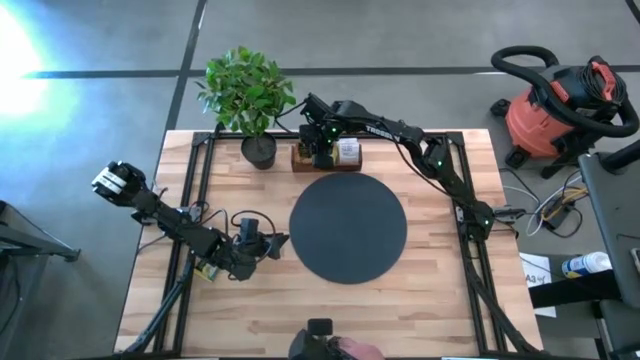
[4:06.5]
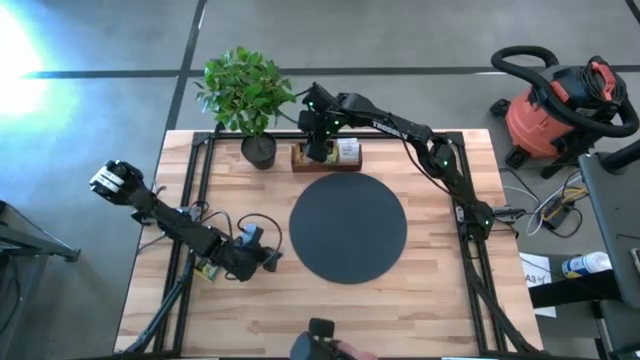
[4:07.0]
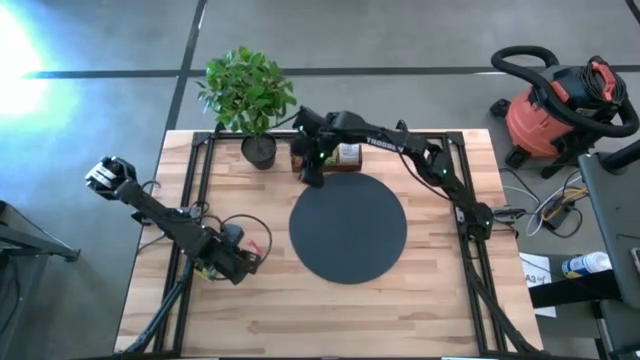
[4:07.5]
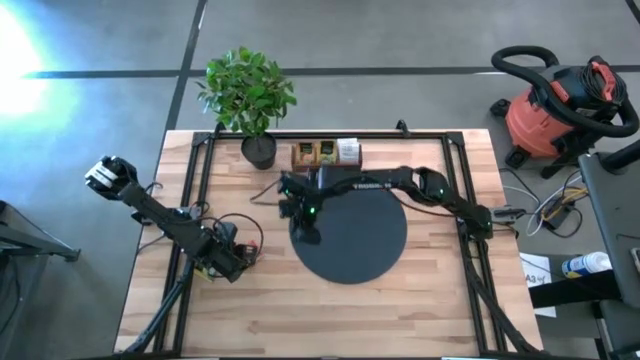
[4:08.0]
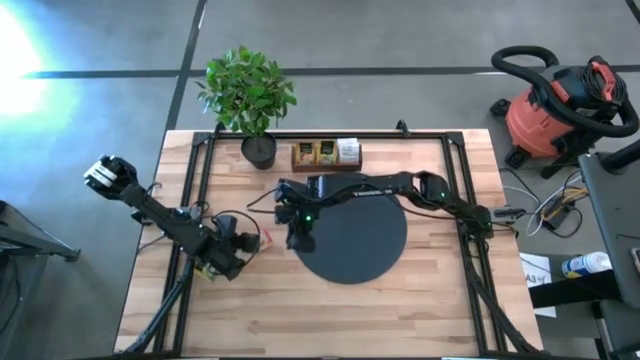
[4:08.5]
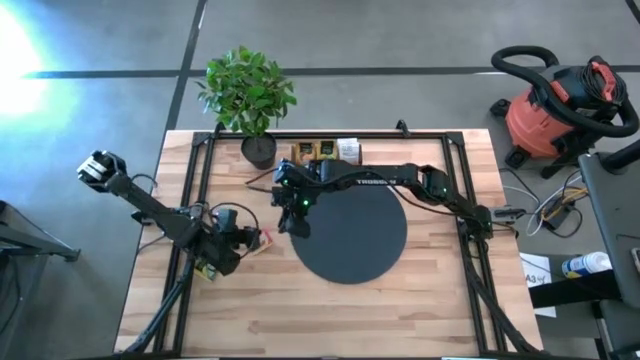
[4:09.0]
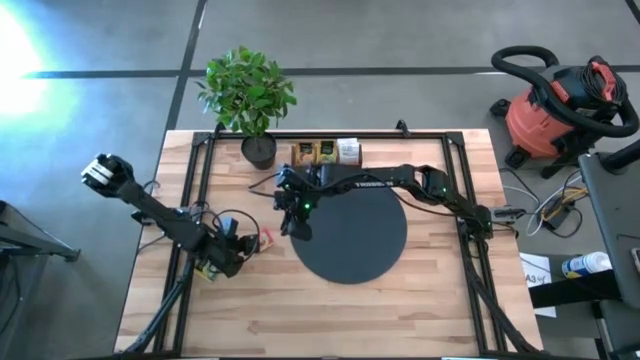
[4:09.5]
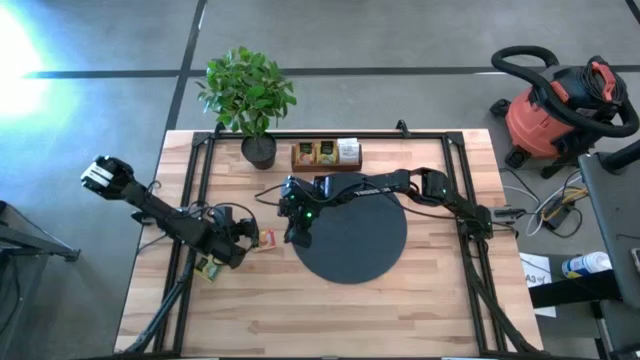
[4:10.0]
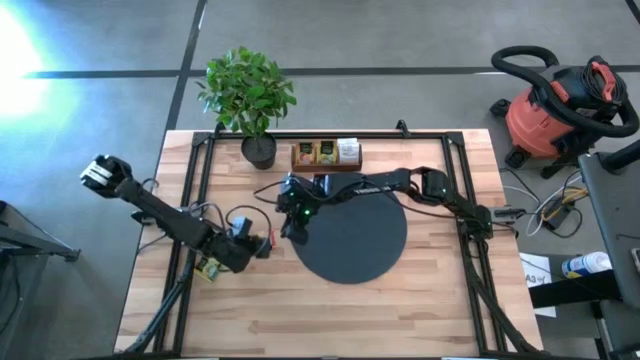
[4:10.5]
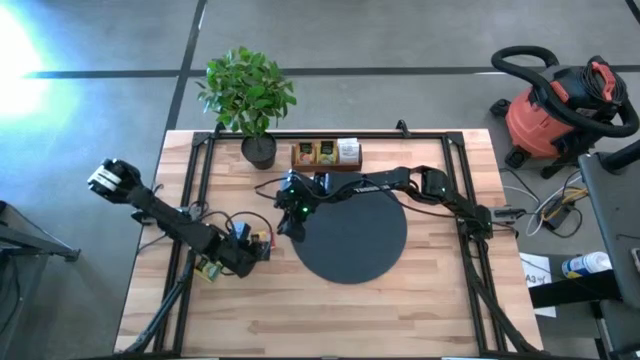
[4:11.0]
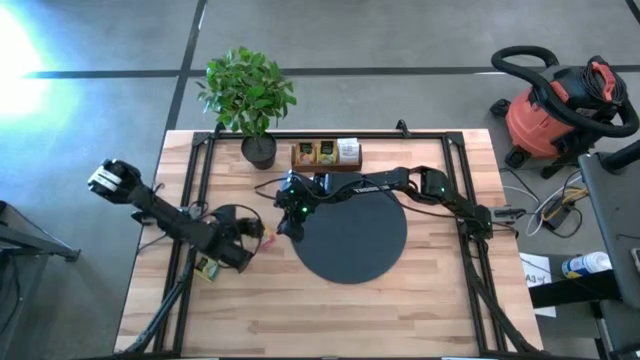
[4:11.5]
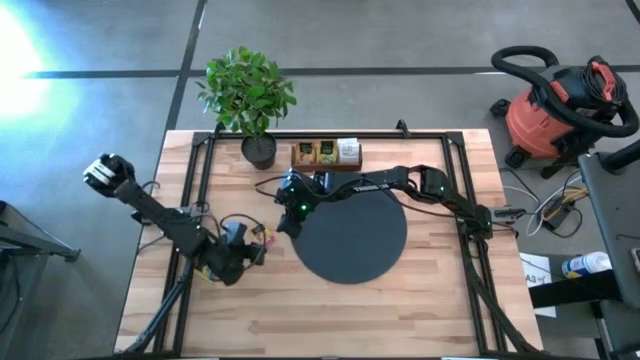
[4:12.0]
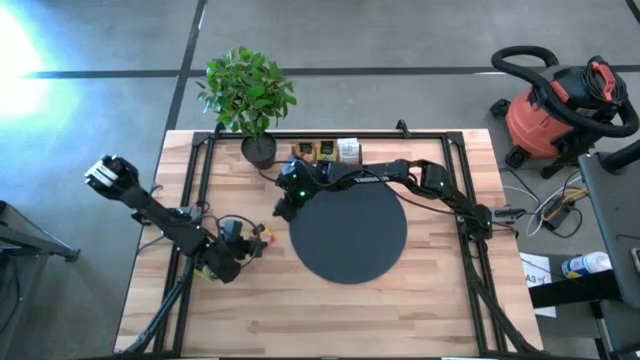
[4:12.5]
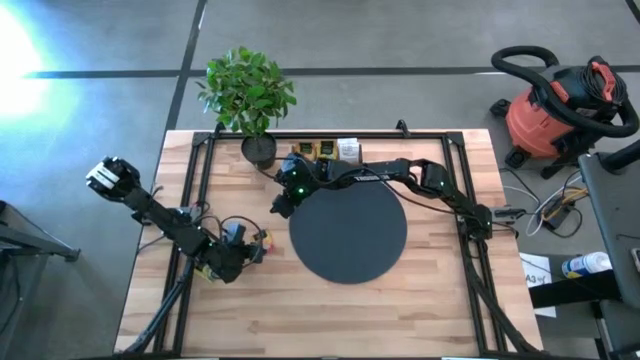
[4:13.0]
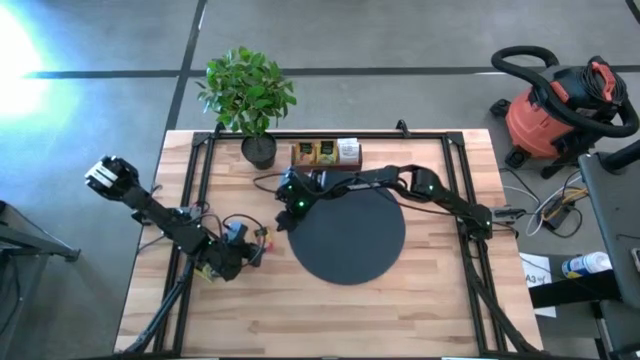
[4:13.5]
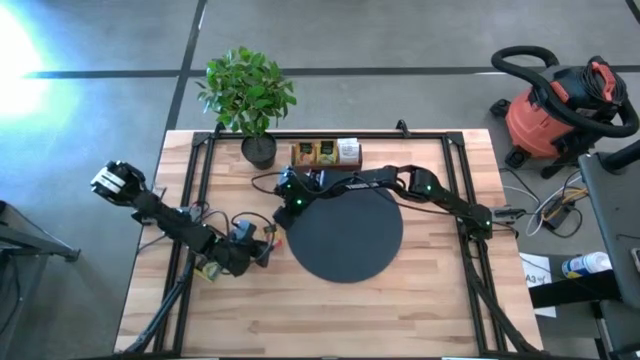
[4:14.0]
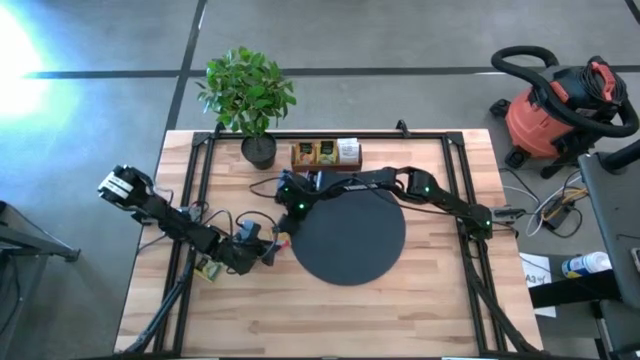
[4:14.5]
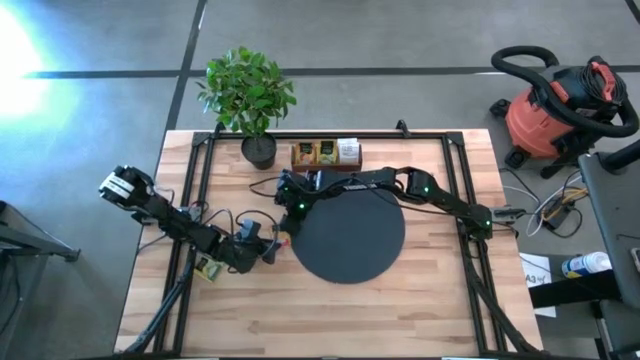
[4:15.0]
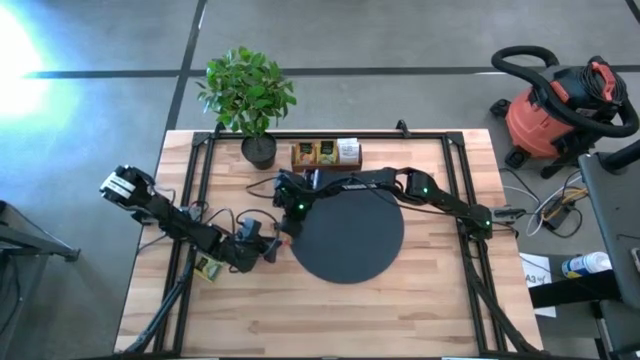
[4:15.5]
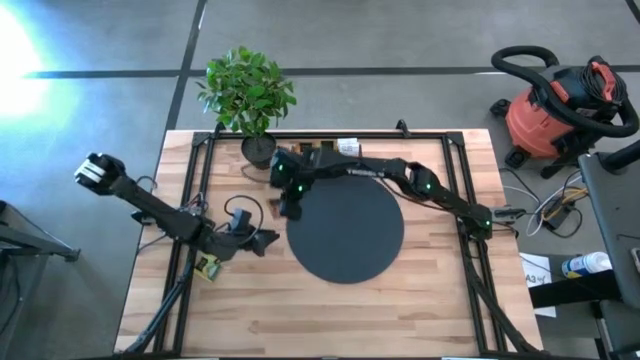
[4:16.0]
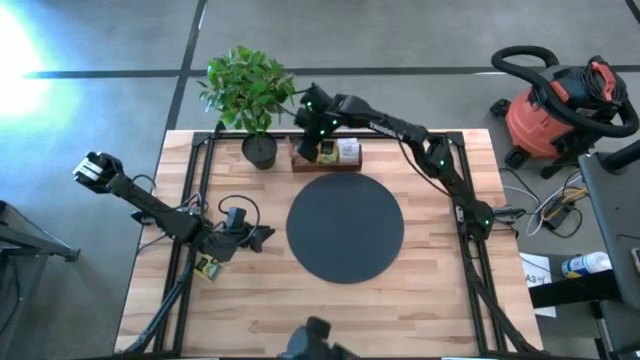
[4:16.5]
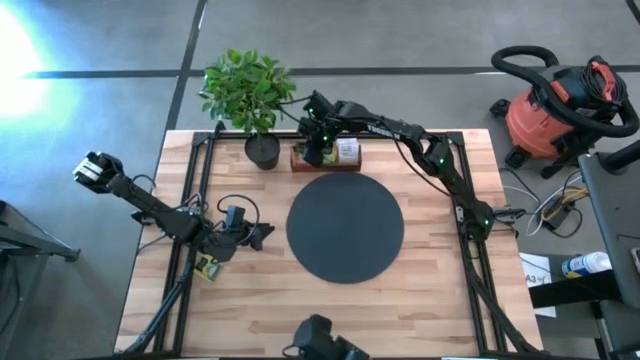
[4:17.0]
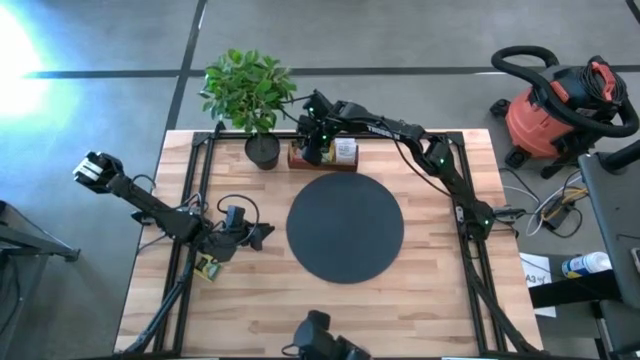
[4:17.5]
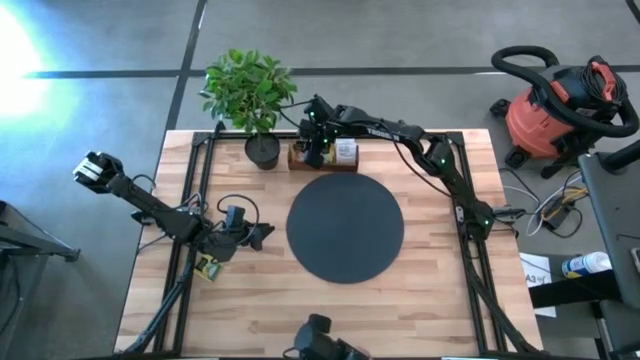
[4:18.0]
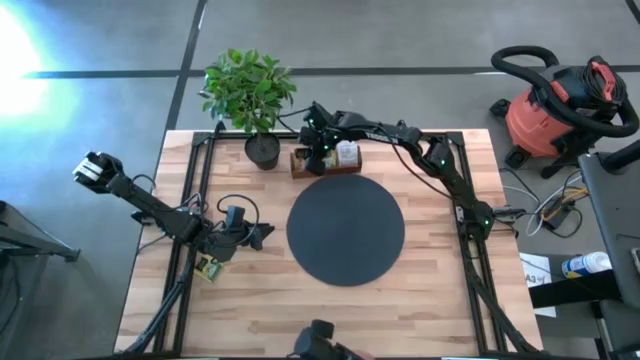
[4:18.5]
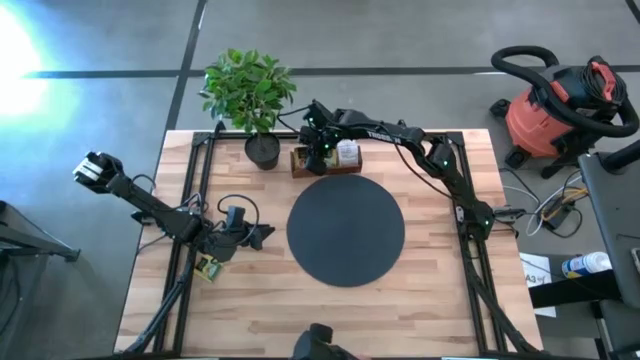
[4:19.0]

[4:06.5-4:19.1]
Task: Pick & Place Tea
Put the orange tea bag into the left slot of the wooden organizer

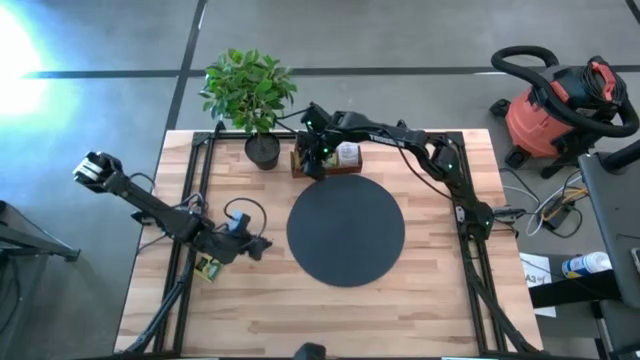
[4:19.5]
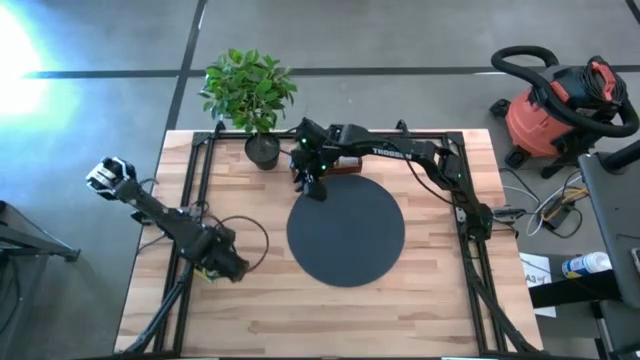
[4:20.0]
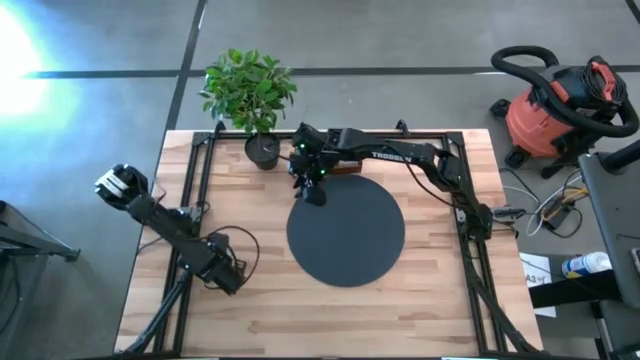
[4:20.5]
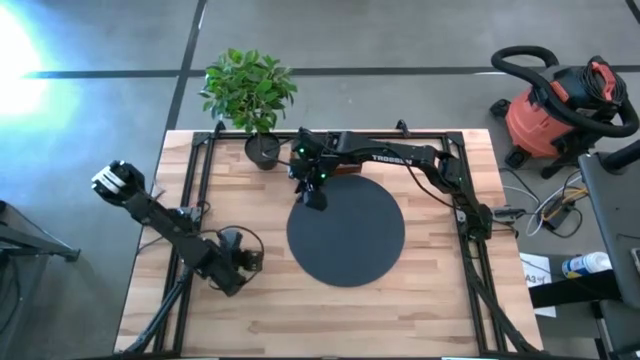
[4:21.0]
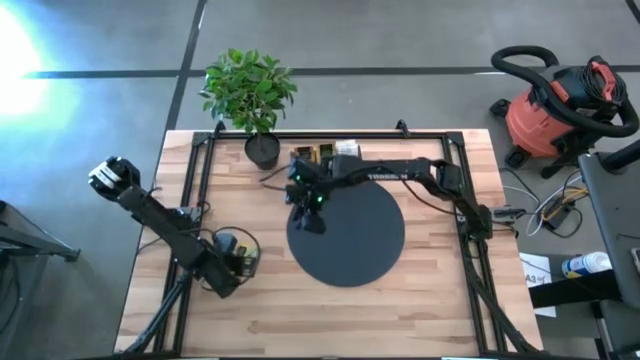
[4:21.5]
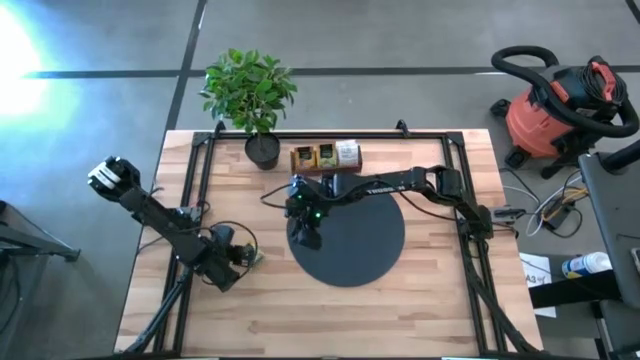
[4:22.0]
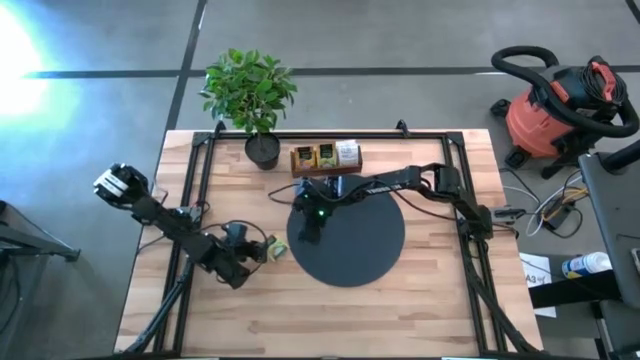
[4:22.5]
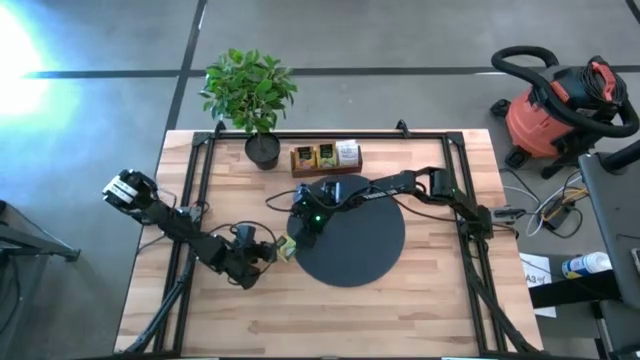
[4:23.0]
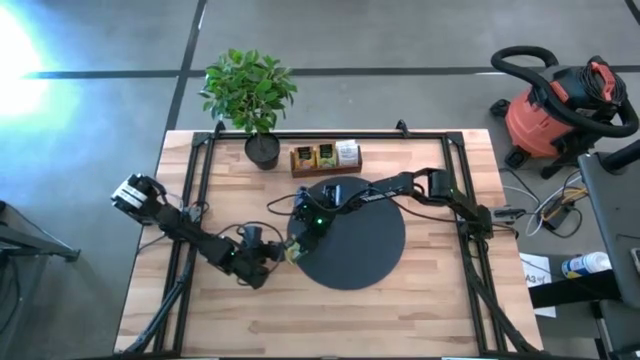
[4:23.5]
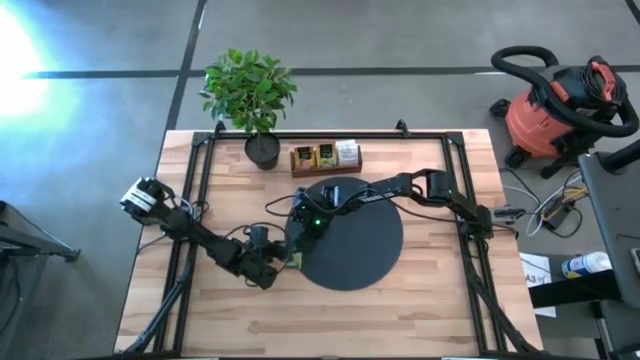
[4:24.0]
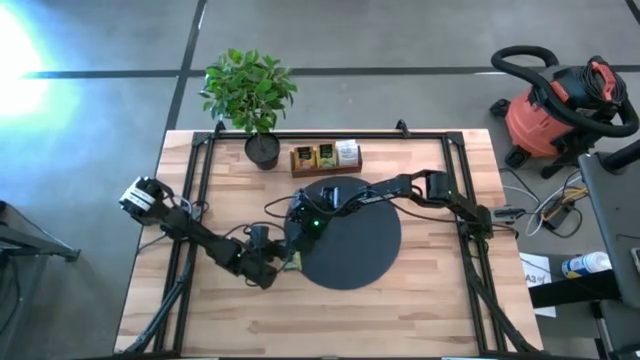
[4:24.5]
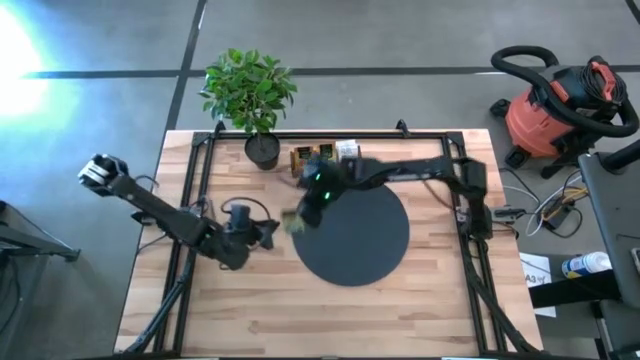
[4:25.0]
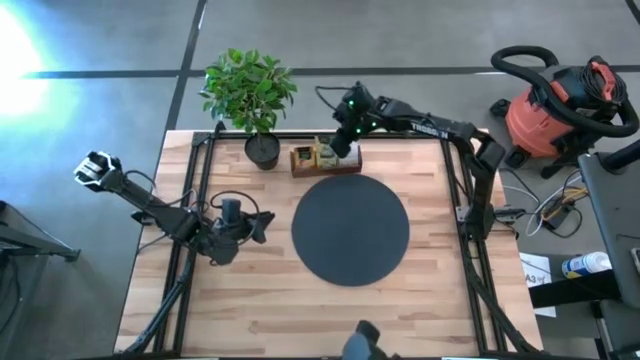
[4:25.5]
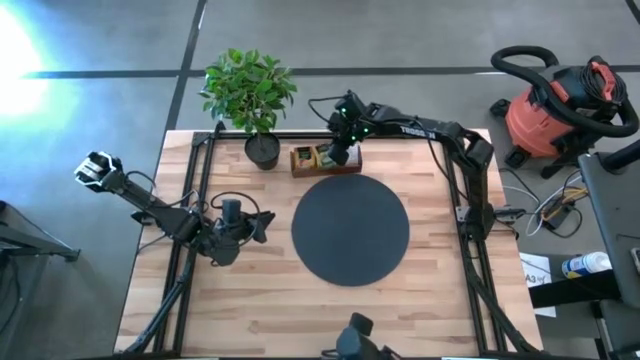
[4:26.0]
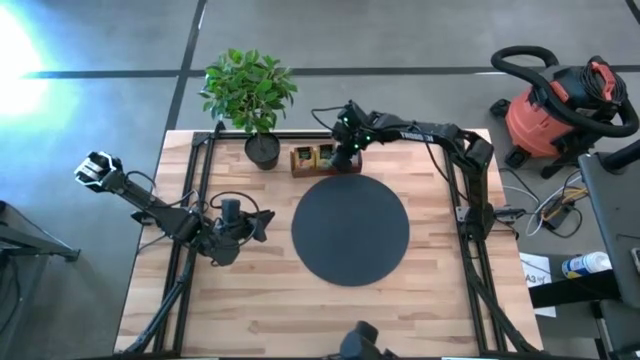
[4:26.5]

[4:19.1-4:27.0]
Put the yellow tea bag into the middle slot of the wooden organizer
